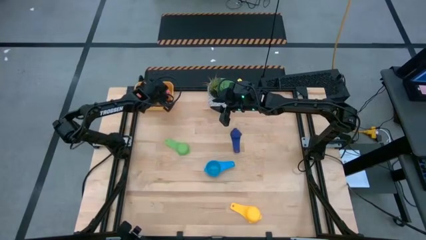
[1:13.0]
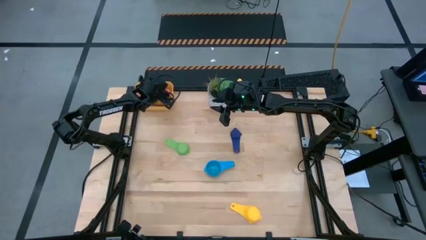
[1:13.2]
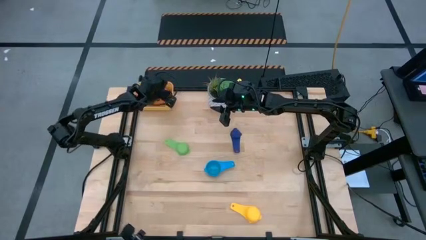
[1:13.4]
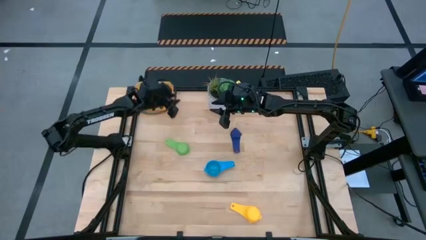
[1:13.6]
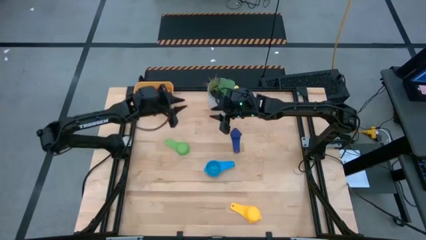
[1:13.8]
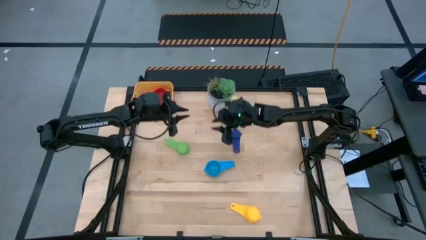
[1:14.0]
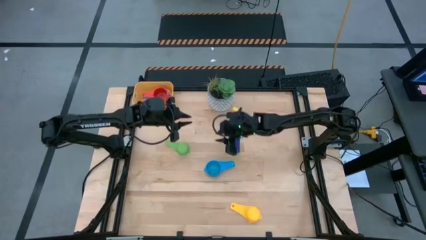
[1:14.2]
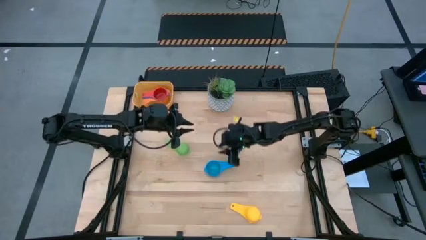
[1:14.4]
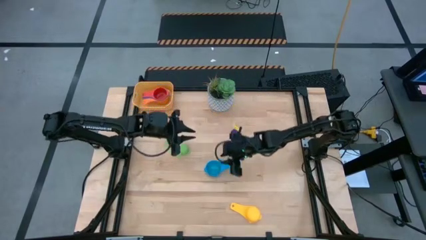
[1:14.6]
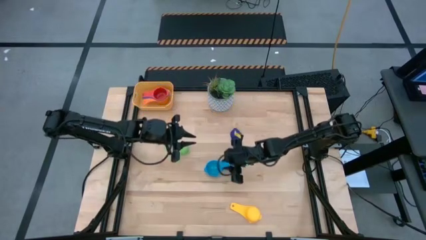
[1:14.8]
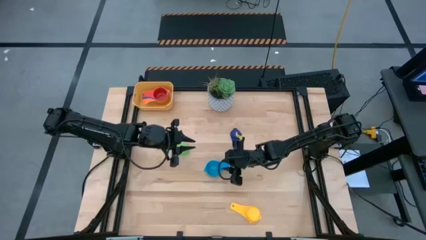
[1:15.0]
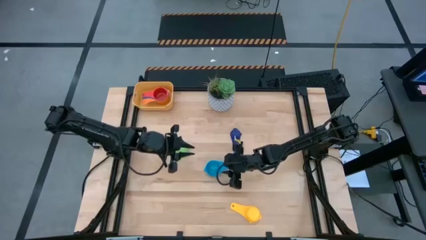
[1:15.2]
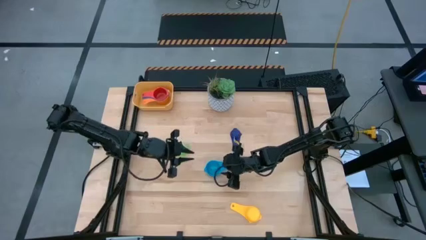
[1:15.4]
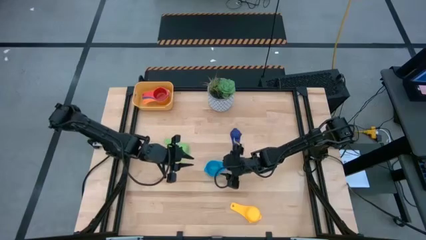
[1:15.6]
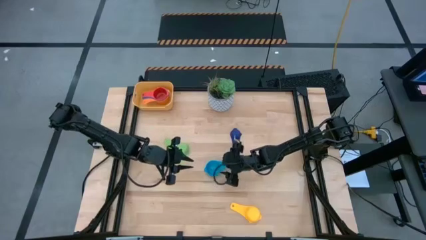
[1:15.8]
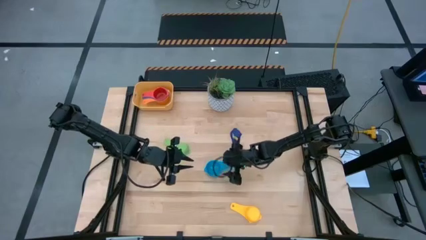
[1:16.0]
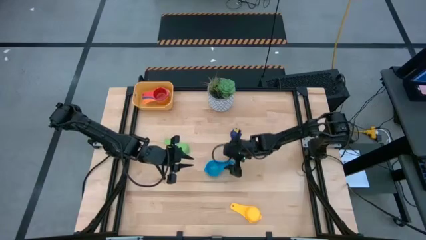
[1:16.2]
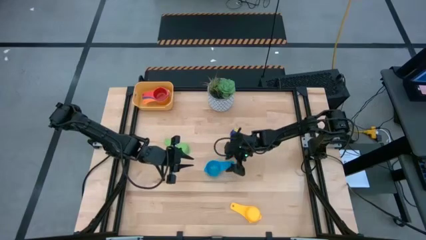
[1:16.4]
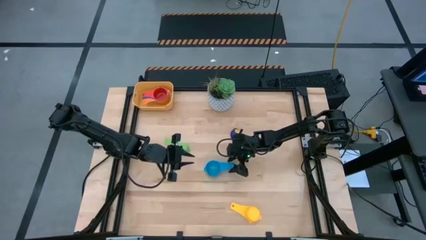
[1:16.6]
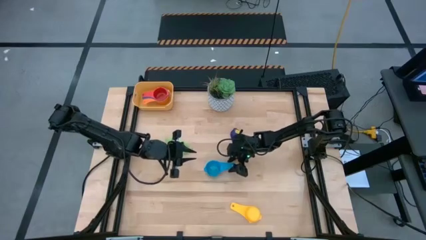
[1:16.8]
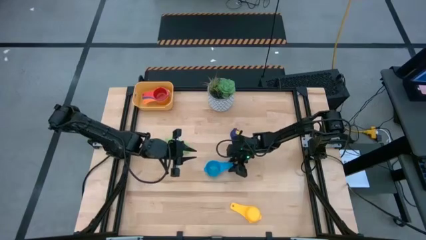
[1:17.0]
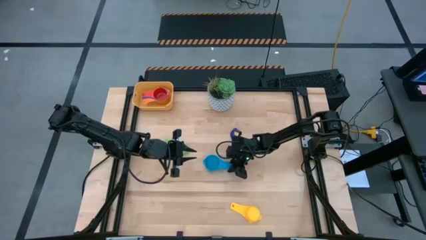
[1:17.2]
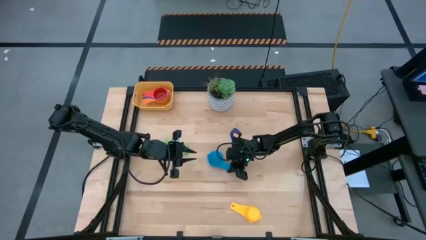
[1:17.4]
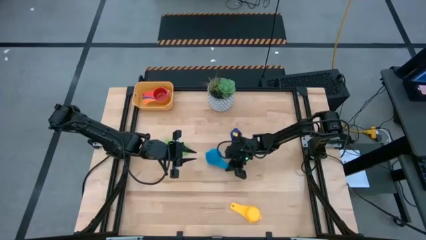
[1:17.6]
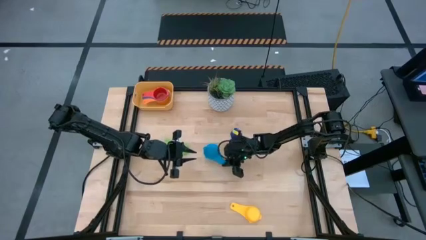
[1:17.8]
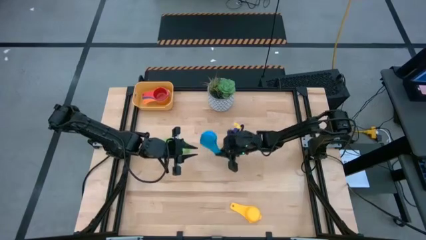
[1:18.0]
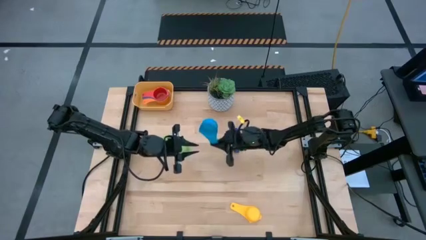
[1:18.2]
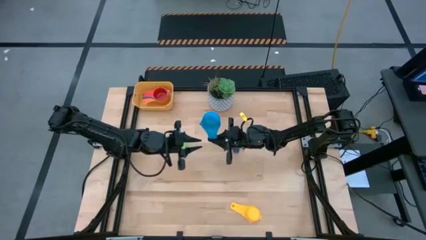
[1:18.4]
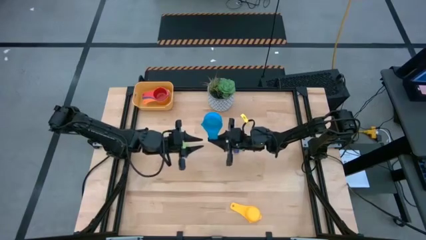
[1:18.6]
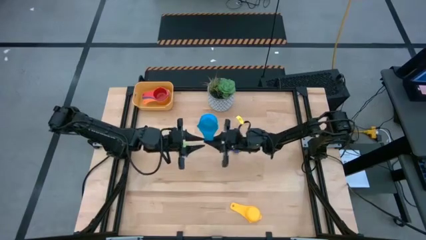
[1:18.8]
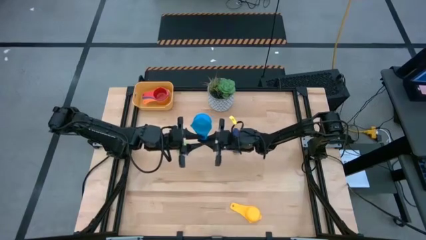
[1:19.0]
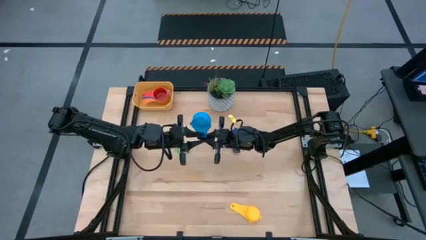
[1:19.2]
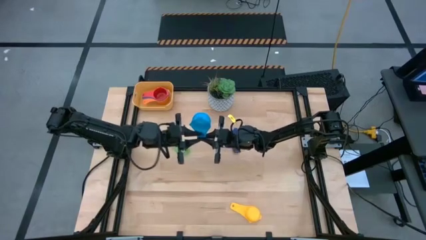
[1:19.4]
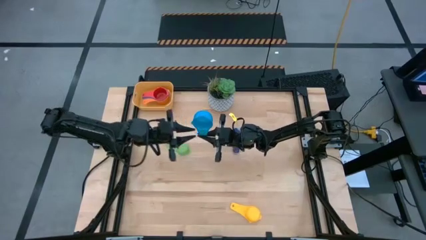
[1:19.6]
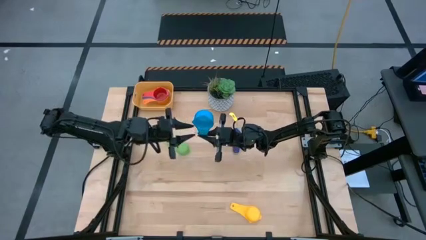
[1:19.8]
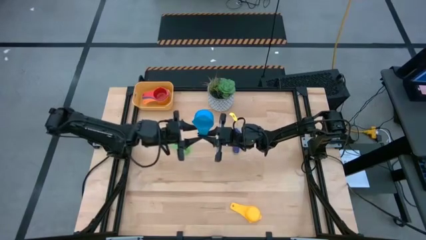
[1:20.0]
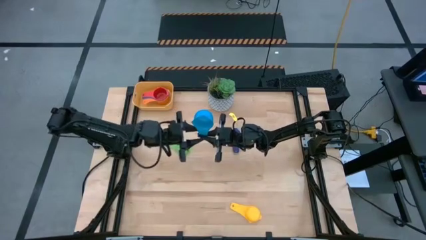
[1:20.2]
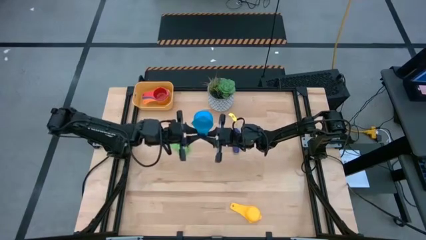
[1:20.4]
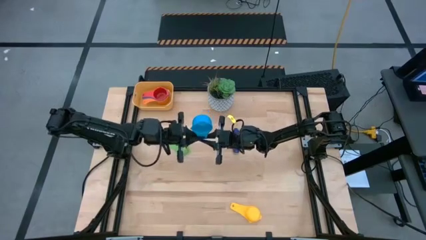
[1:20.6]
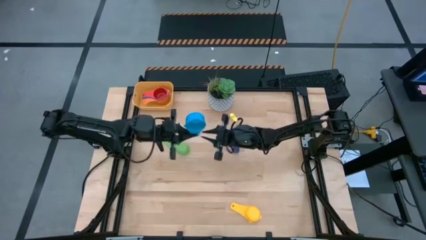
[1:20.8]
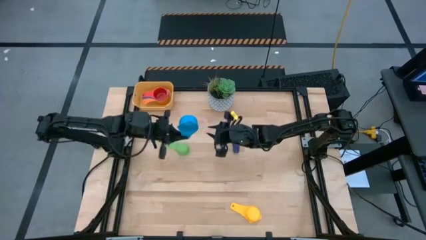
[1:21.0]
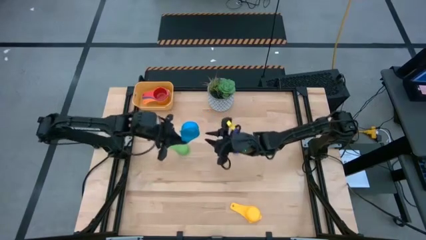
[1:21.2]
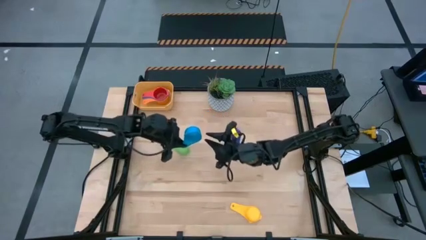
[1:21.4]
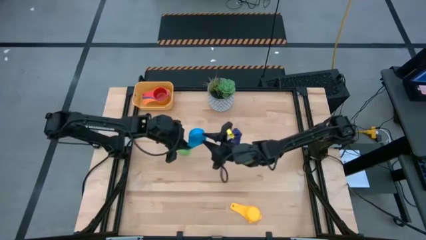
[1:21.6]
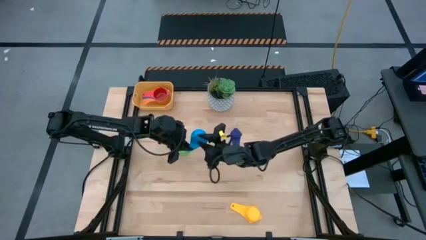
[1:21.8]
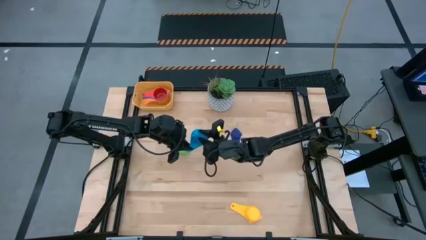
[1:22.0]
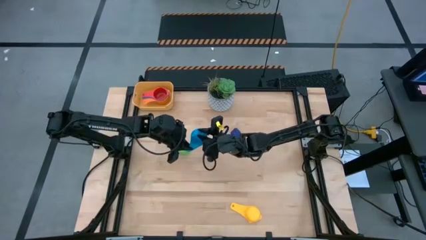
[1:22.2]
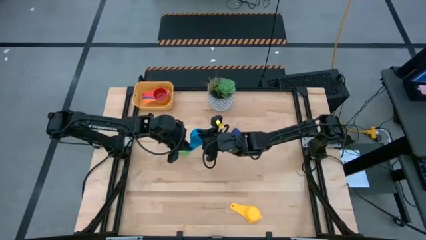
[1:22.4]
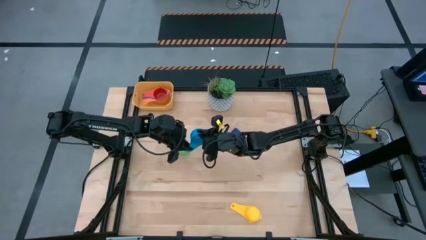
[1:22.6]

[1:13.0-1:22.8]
Task: Nest measuring cups in basket
Stack the light blue measuring cup on top of the dark orange measuring cup in the yellow bin
